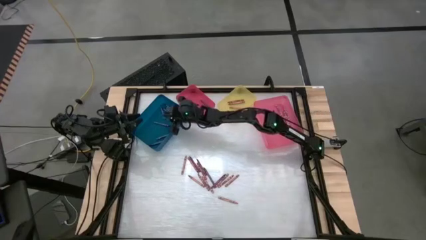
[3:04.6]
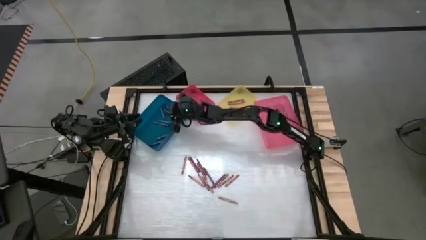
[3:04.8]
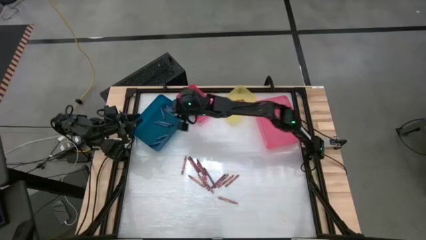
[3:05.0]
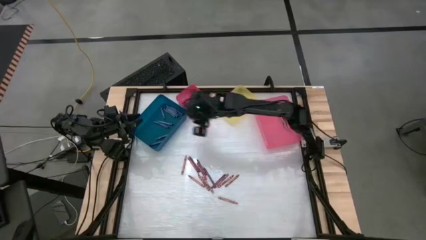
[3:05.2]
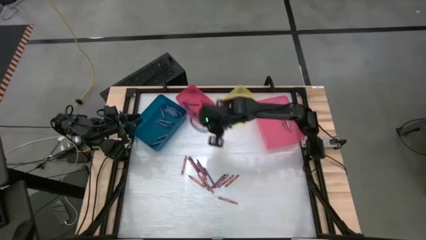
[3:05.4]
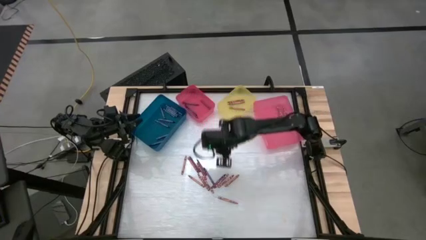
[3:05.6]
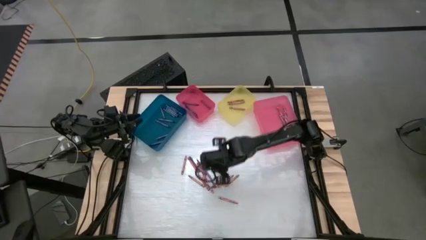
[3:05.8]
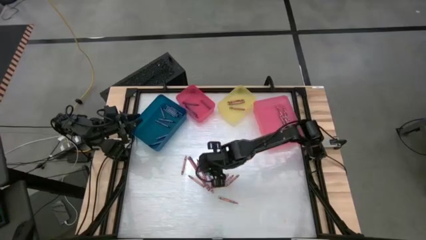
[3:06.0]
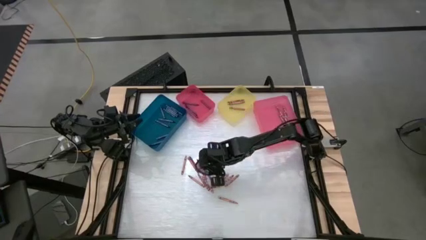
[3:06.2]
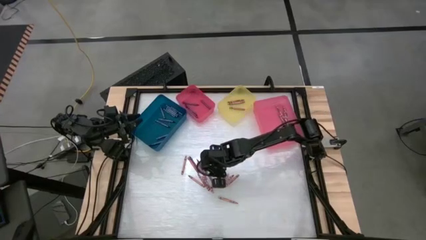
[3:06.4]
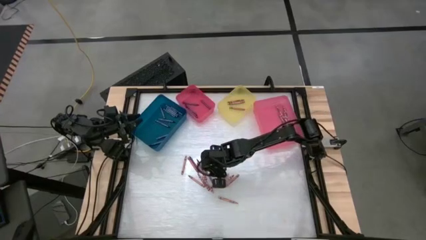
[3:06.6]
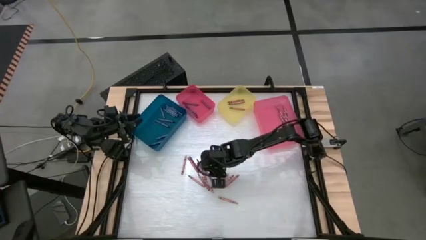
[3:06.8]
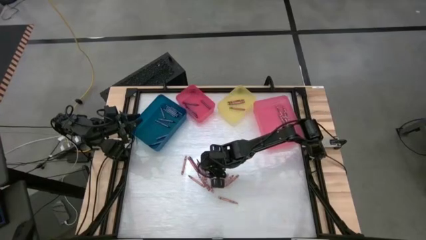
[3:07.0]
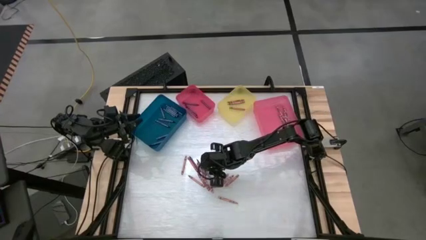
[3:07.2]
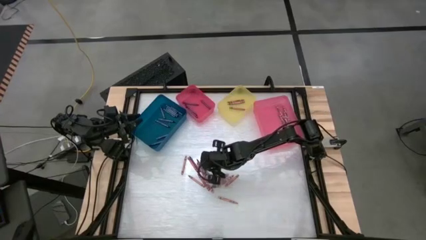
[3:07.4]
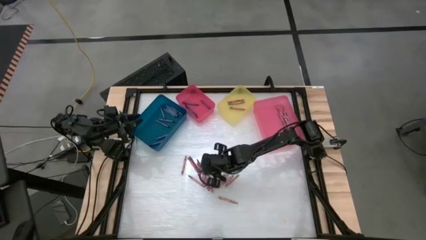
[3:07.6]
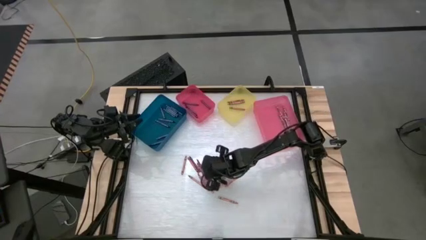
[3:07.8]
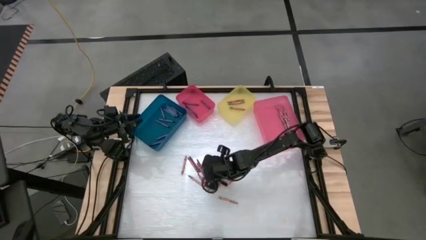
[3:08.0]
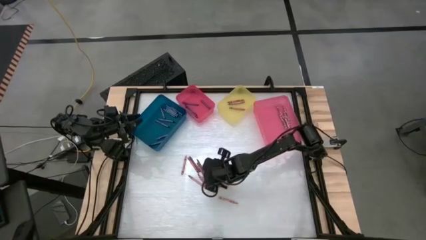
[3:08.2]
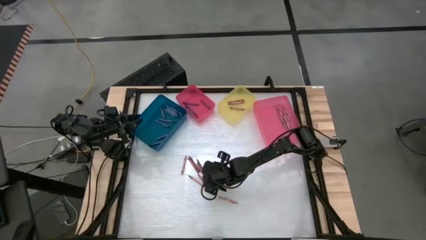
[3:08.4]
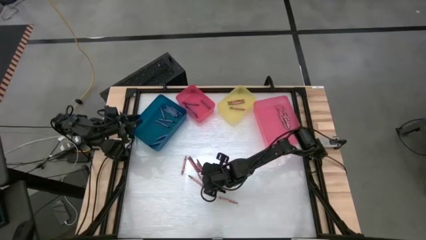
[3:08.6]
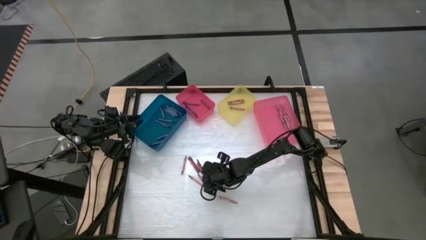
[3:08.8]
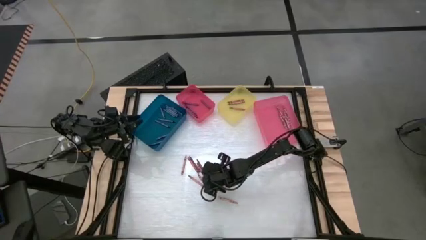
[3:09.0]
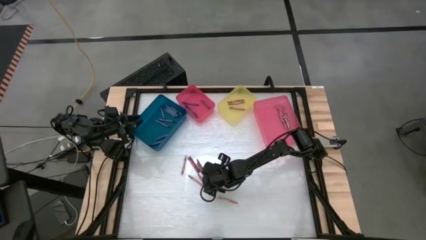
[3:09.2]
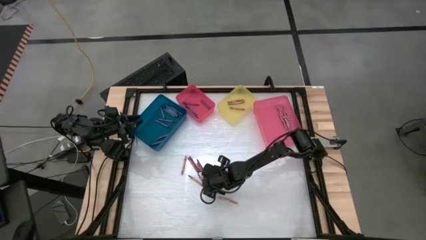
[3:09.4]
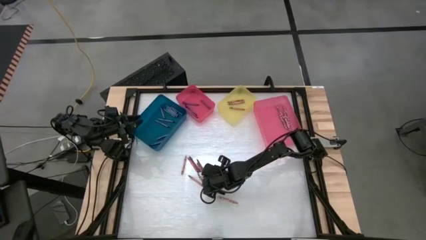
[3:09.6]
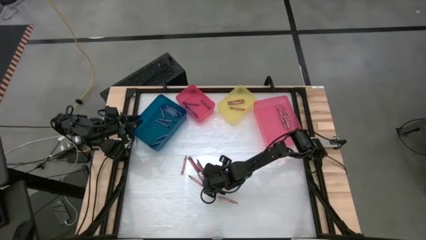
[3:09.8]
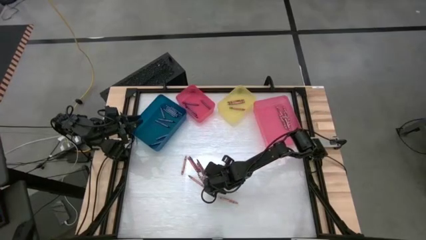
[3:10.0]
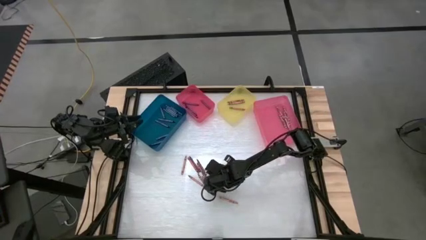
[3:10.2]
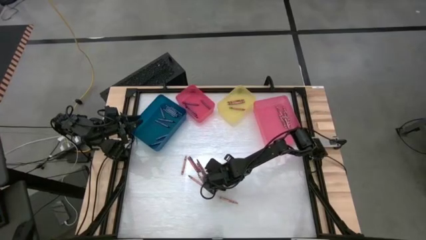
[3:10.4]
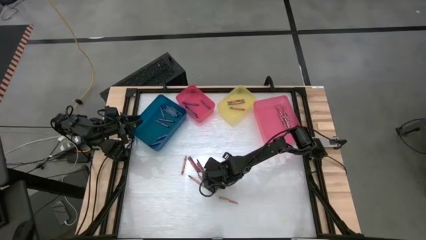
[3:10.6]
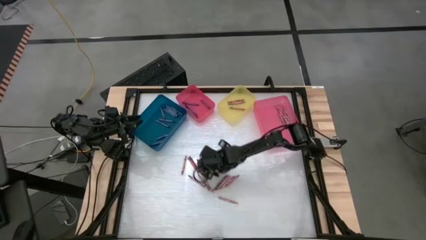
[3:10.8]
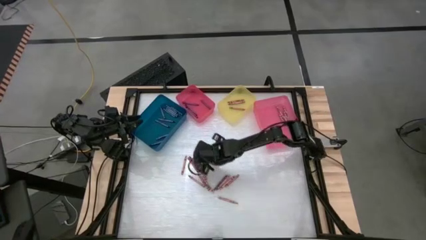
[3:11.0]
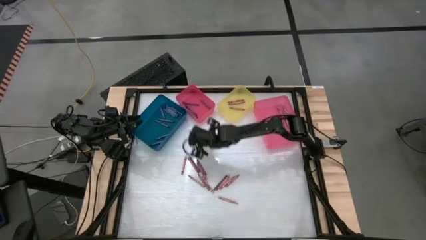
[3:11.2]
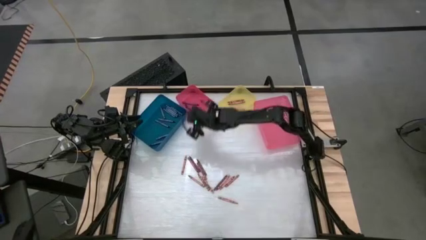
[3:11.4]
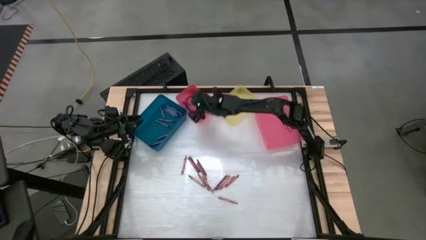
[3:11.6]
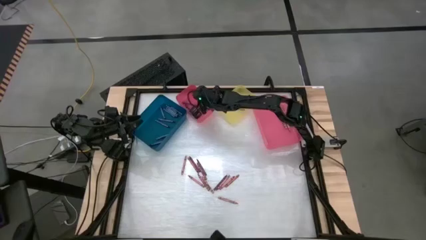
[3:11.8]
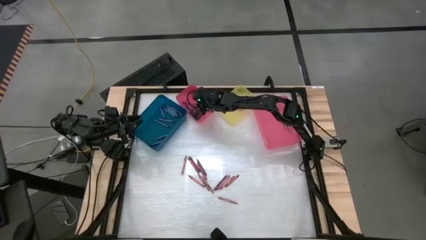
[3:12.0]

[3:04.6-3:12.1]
Task: Sort crayons
Put the violet crayon into the left pink bin

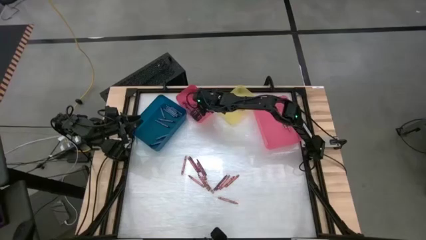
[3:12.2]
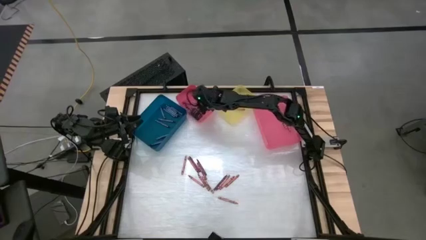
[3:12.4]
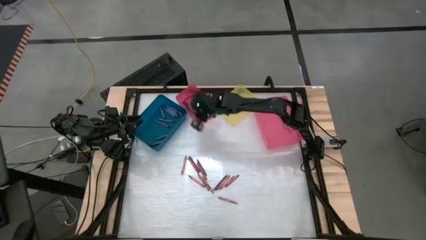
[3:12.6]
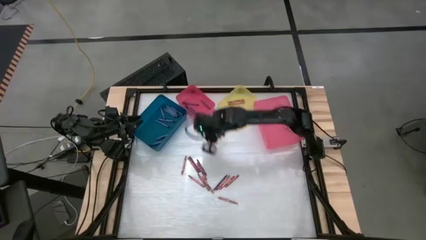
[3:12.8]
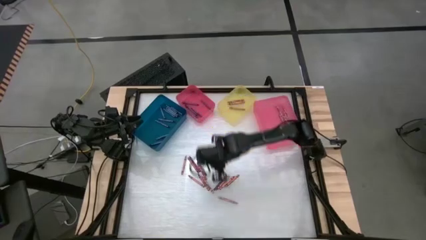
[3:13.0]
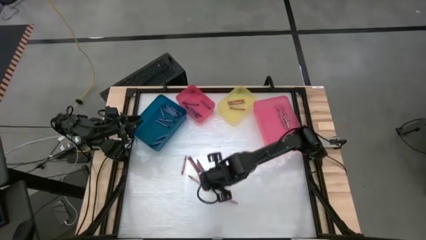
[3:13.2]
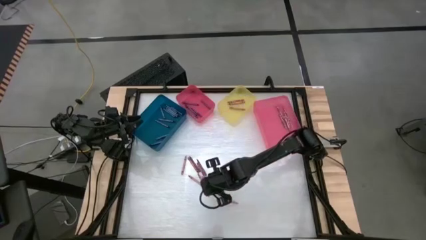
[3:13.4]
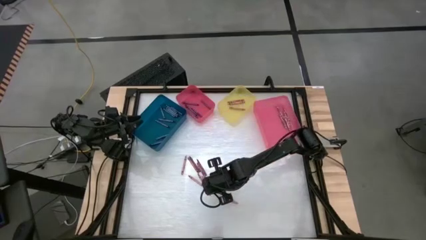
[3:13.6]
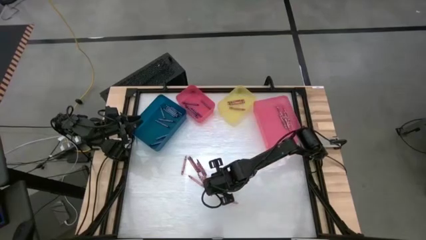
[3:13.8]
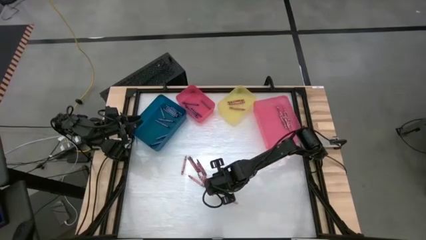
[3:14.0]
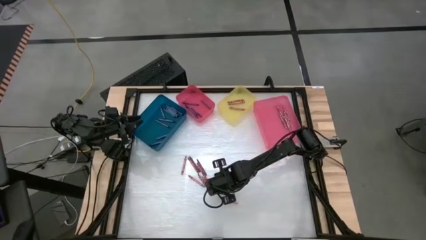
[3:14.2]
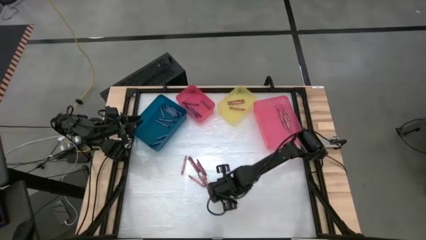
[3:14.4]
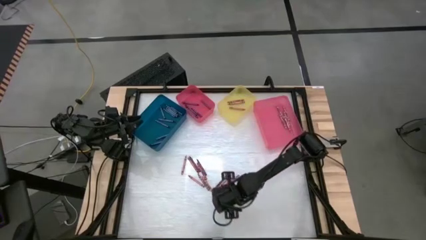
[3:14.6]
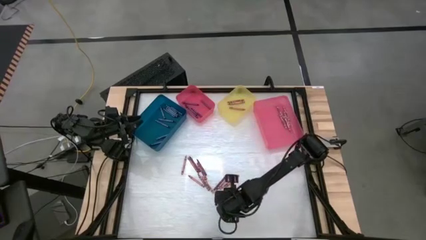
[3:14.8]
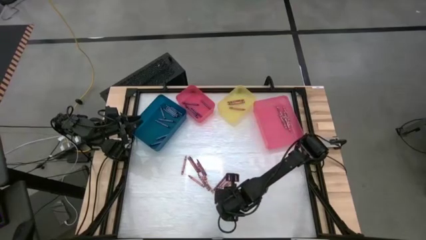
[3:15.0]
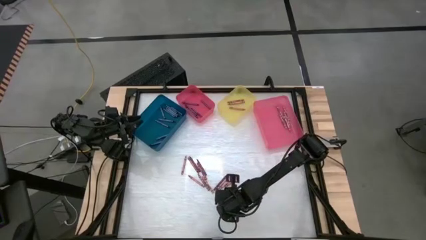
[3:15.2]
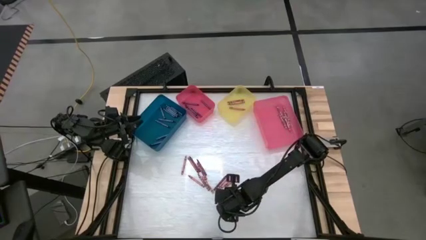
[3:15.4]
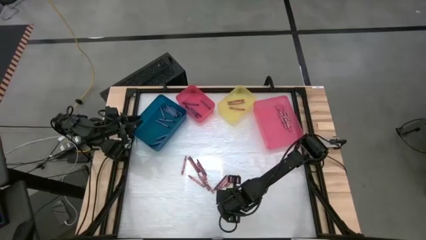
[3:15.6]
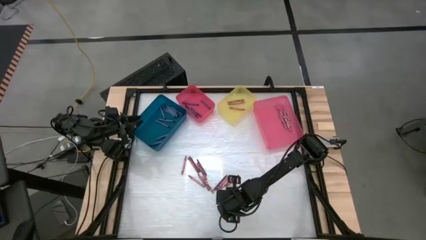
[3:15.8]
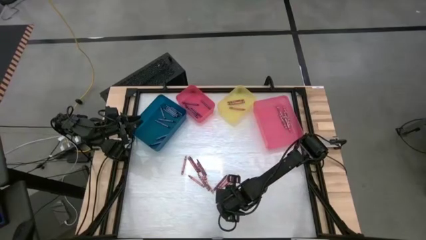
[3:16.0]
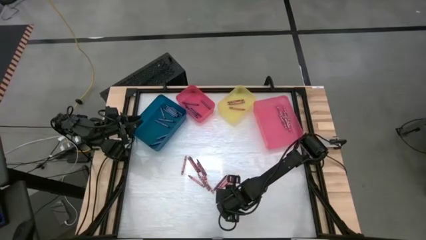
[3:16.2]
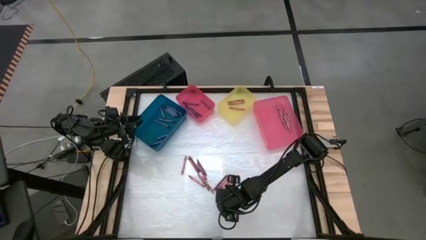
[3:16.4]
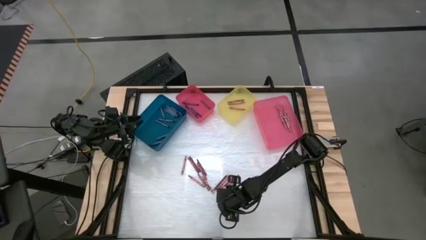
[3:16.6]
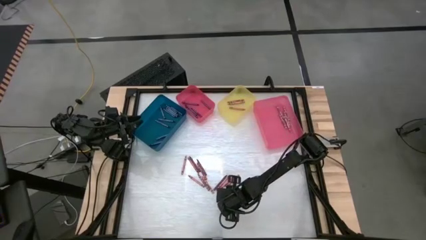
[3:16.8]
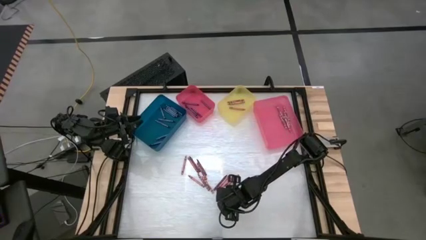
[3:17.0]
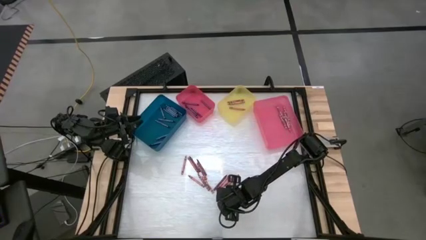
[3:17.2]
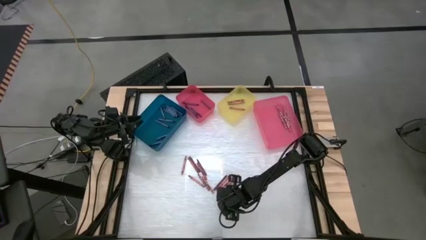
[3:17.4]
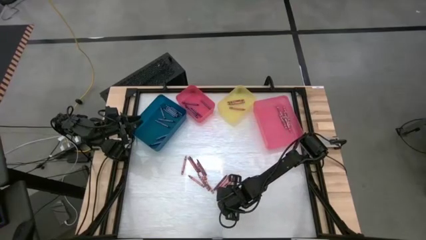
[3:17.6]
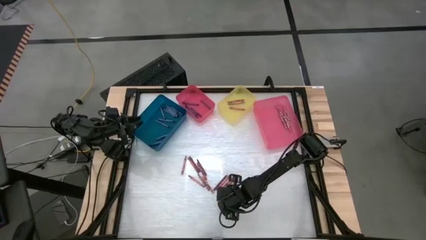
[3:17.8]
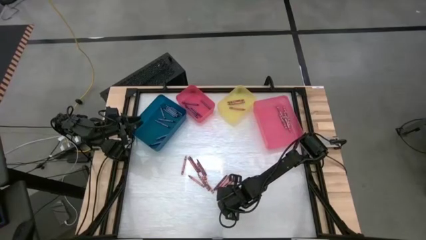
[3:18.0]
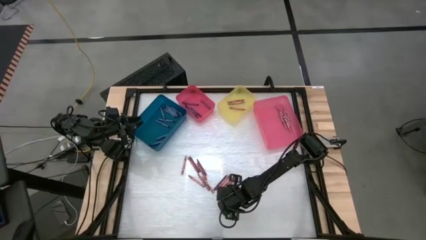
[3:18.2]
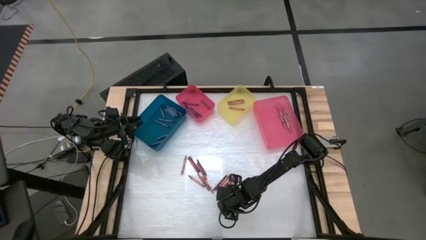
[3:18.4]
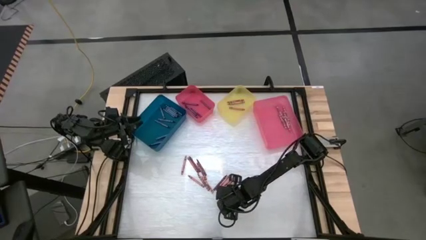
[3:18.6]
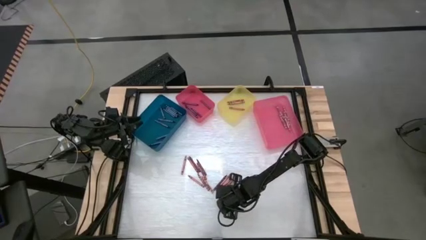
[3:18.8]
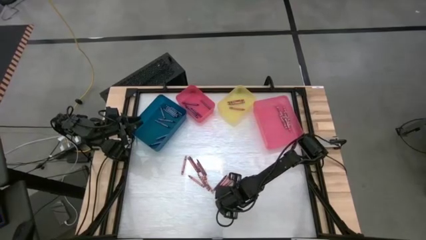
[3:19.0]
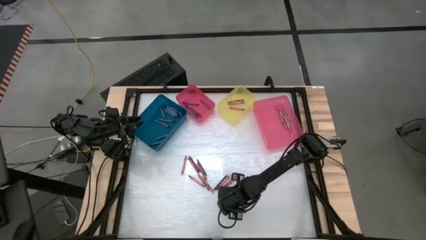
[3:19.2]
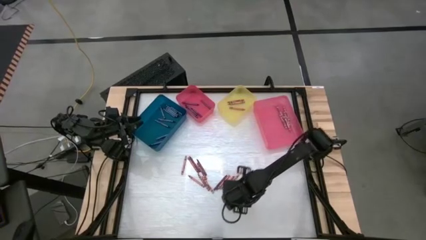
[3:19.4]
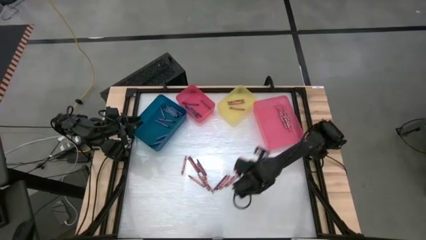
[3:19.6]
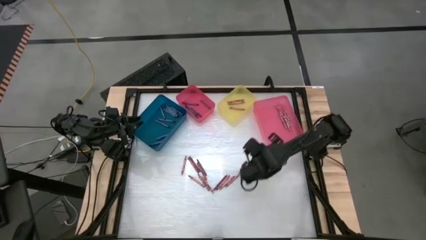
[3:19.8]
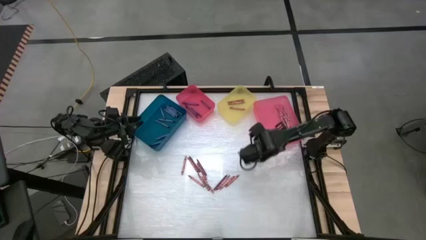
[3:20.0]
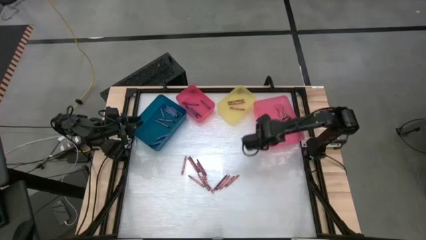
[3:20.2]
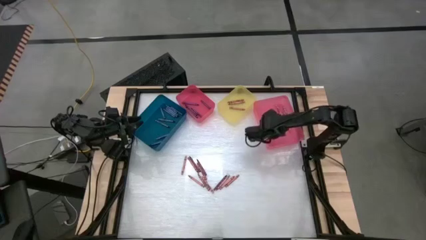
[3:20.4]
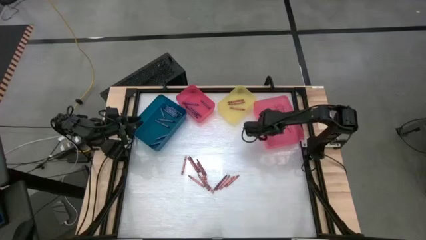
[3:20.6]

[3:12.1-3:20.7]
Put the pink crayon into the right pink bin
